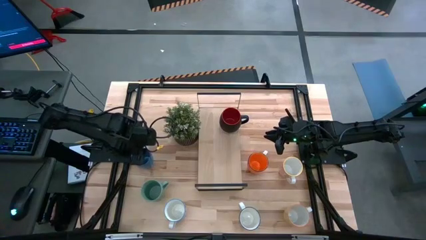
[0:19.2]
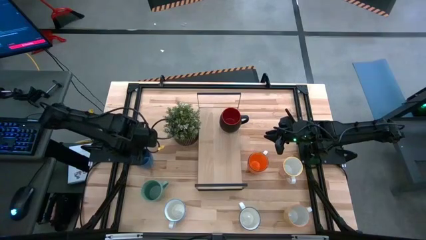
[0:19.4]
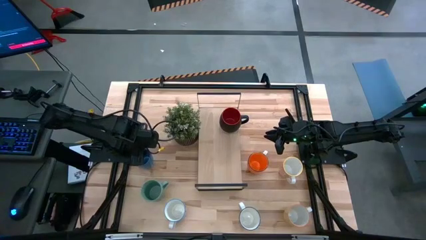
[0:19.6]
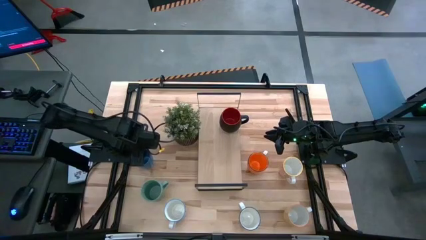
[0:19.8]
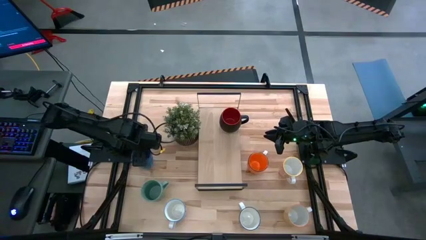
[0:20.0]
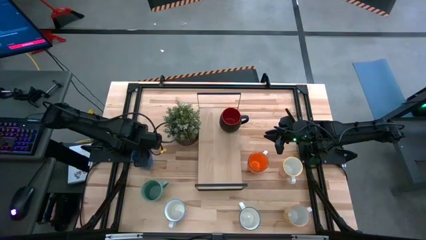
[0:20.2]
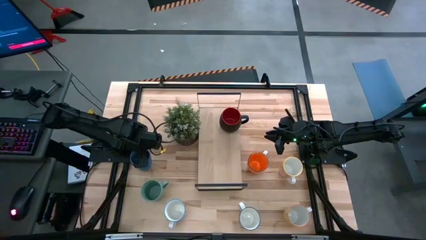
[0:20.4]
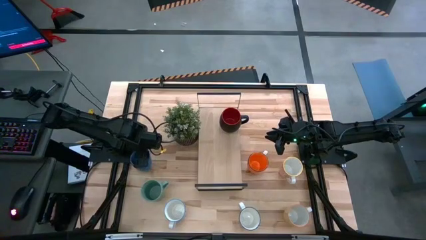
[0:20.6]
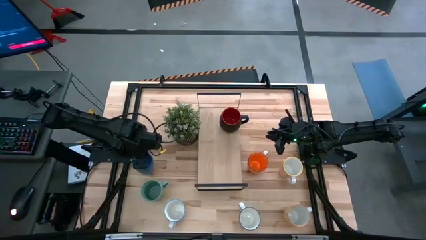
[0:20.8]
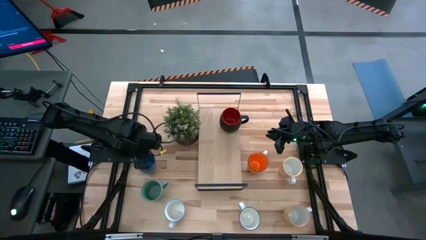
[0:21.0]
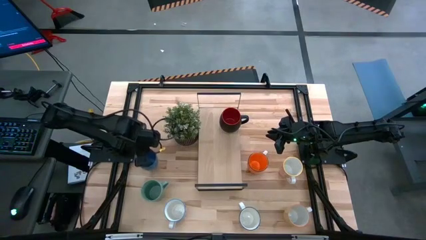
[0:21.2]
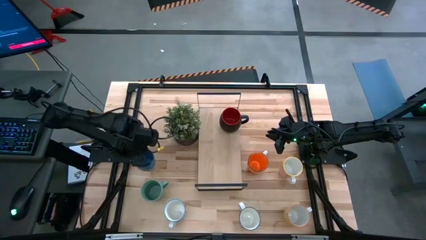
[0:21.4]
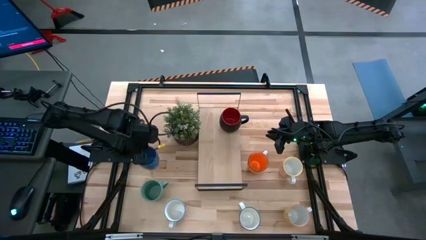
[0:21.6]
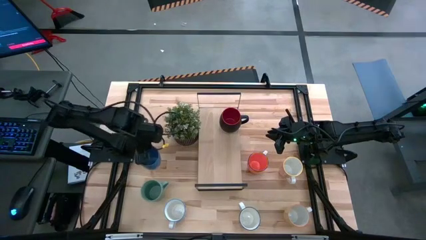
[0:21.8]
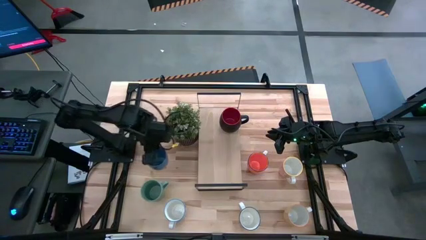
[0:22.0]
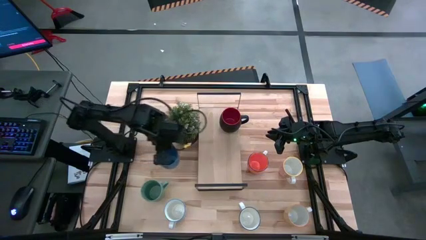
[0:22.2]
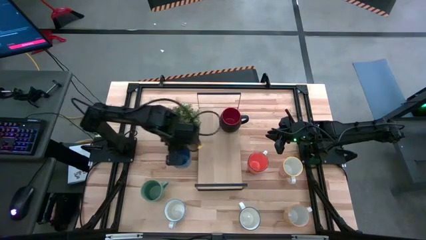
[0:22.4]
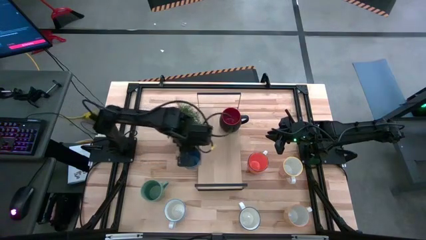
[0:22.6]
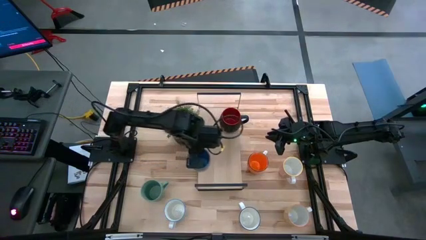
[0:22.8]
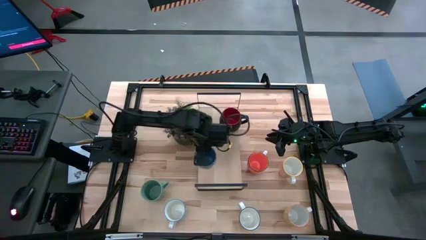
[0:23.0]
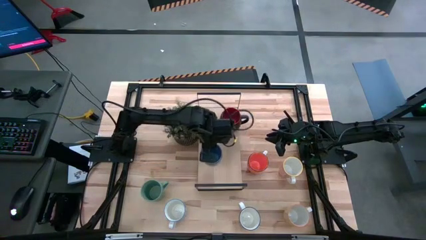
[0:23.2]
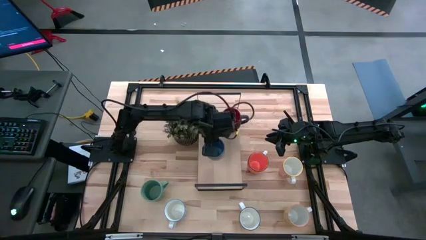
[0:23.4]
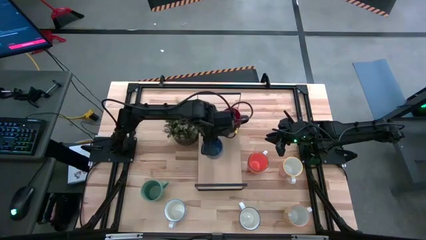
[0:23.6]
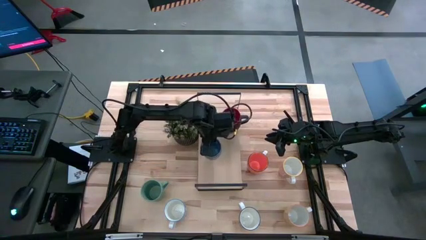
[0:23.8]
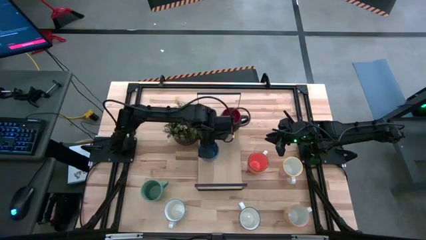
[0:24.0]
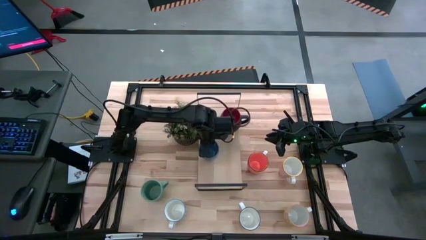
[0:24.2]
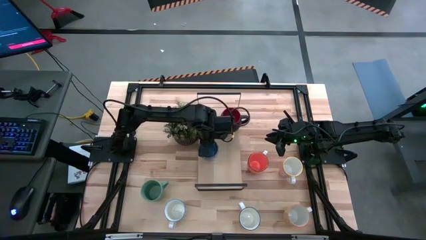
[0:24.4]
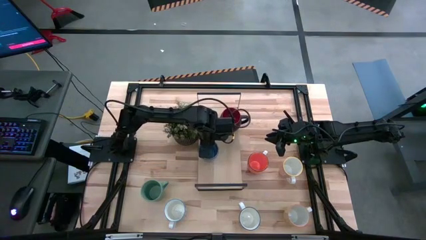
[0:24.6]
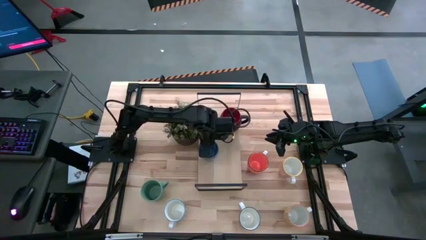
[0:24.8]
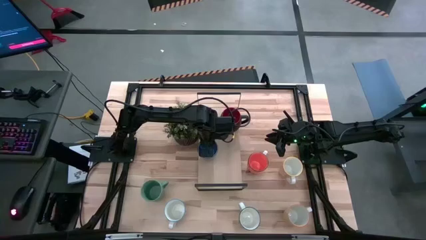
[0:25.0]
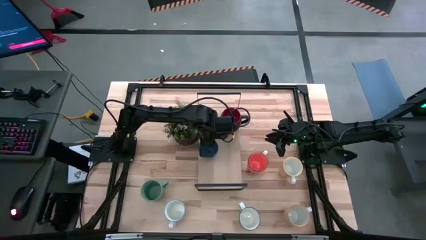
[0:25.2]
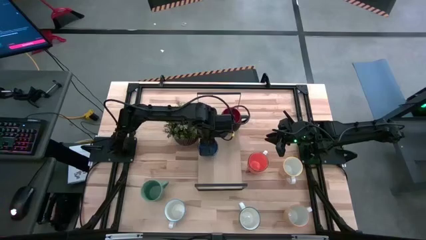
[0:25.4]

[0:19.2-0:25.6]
Task: Place coffee mugs
Put the blue mug on the shelf

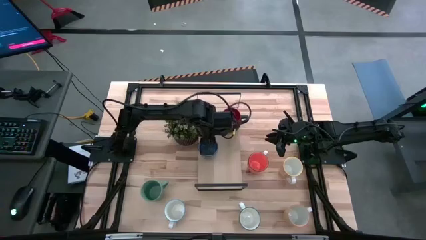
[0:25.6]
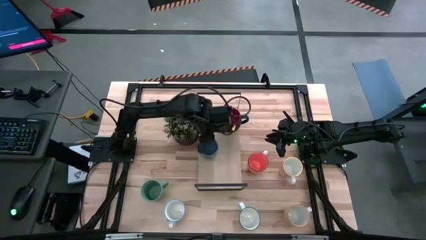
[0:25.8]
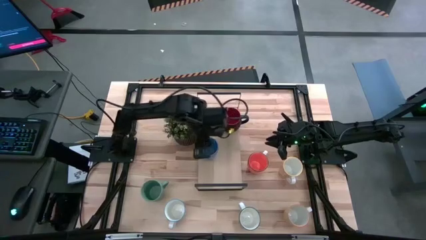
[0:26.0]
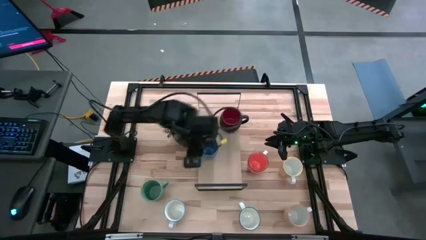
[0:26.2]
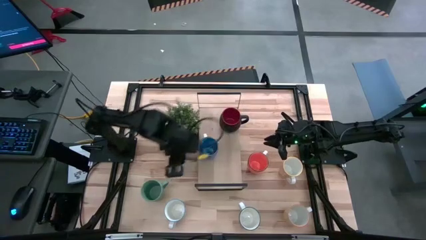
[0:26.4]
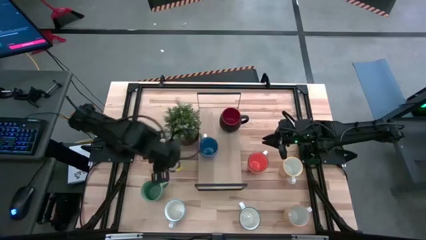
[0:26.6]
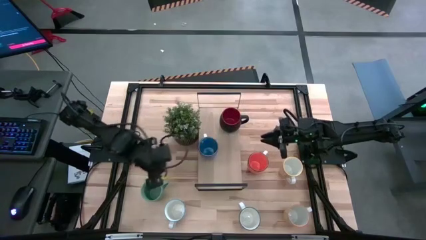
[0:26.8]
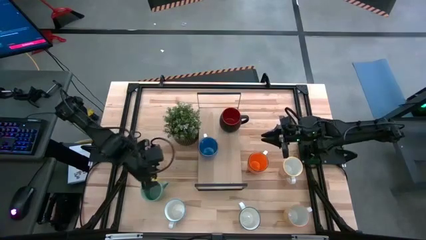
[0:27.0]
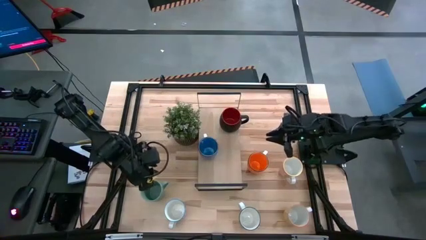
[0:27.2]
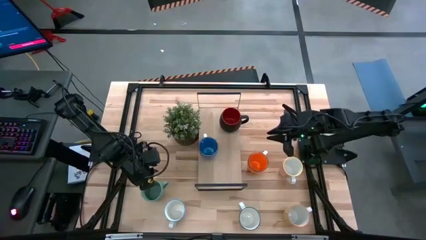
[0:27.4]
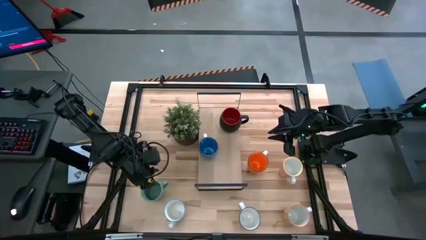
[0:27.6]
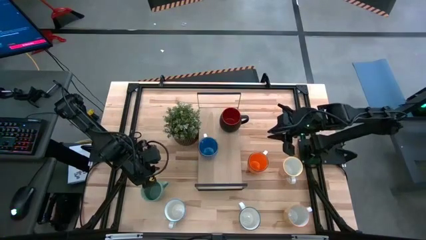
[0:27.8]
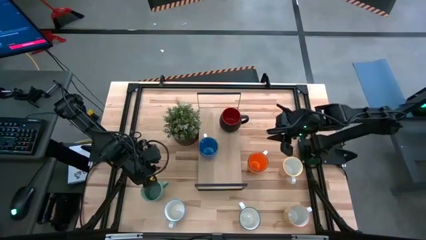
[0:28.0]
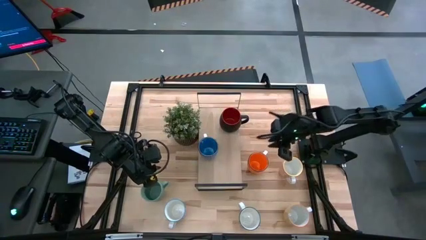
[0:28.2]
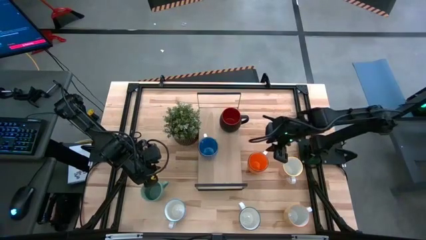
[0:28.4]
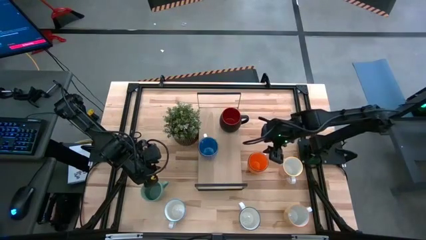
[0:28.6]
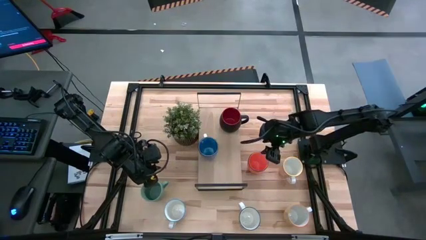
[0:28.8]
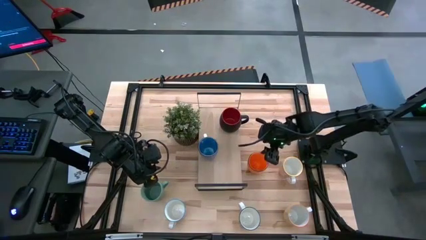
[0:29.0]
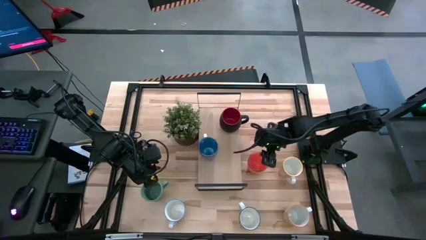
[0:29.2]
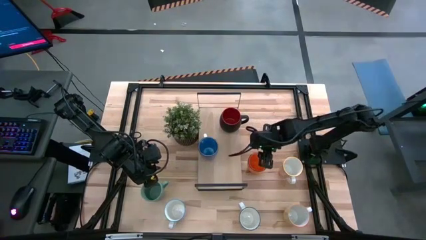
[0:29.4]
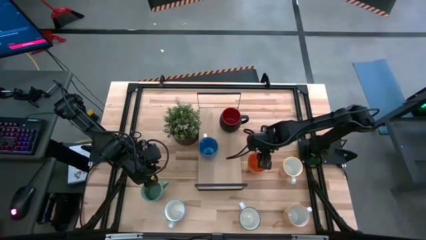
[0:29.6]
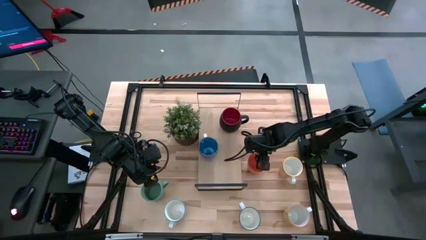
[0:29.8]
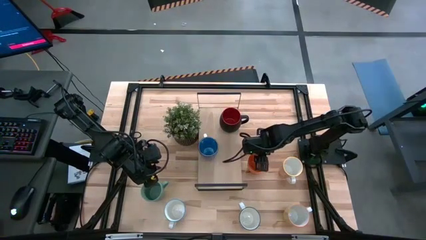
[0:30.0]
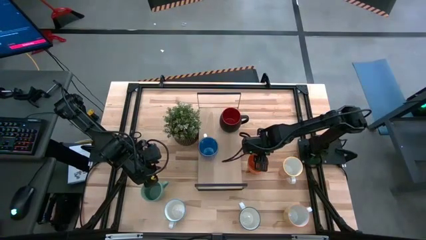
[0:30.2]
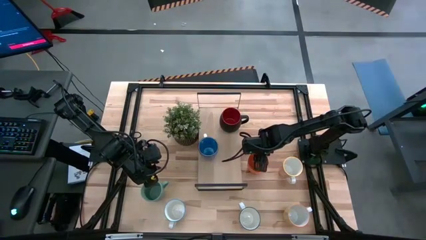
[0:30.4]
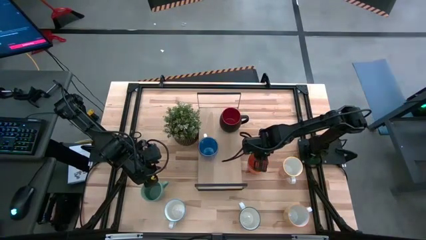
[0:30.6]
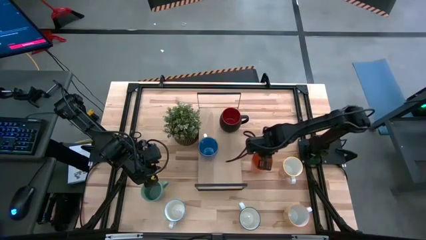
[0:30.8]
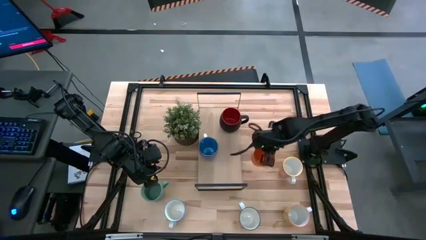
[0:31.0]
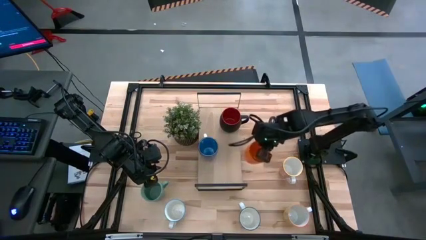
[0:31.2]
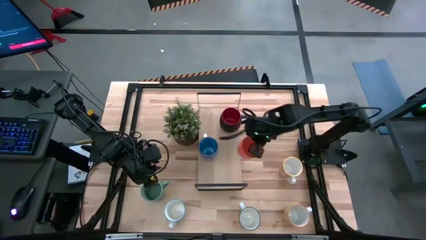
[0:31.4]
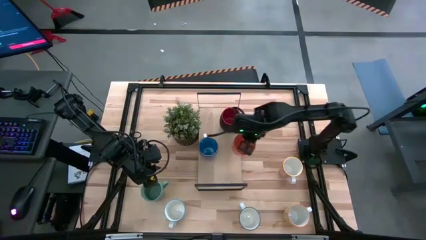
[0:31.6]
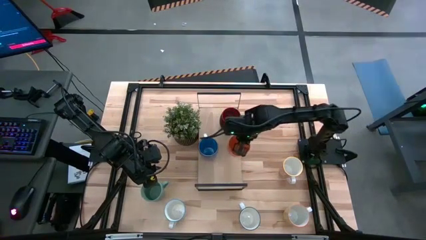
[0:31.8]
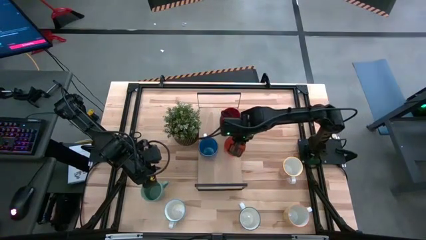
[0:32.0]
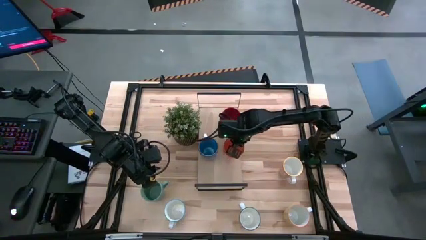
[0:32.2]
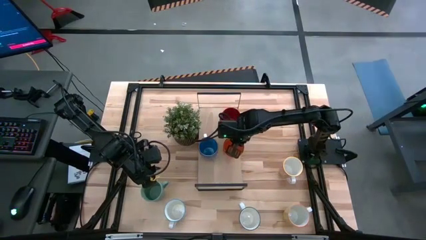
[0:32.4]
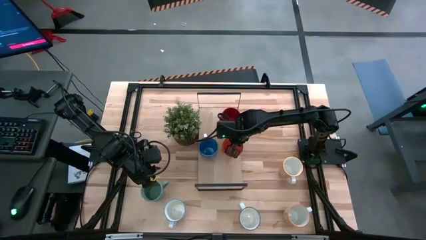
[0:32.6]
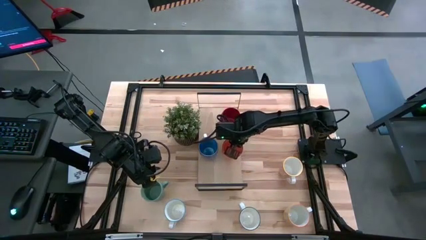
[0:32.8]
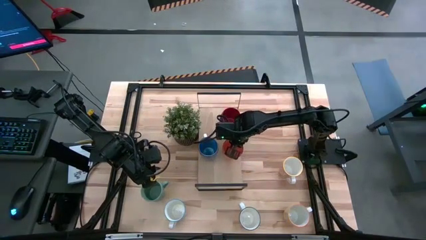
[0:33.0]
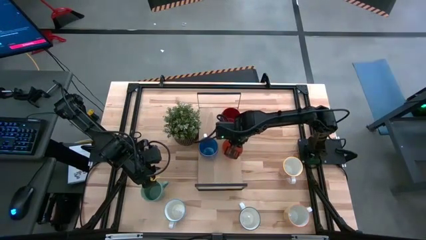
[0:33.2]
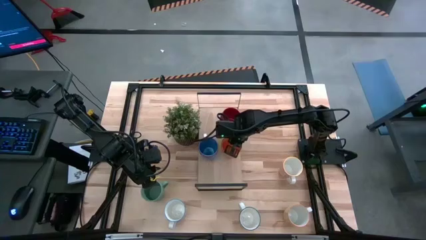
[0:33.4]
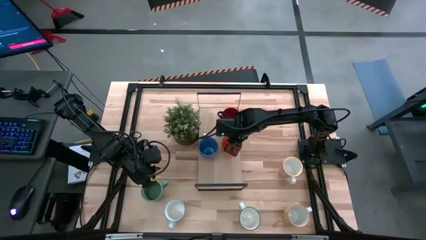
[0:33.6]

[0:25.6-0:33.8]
Put the orange mug on the shelf

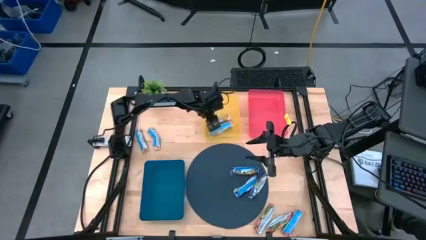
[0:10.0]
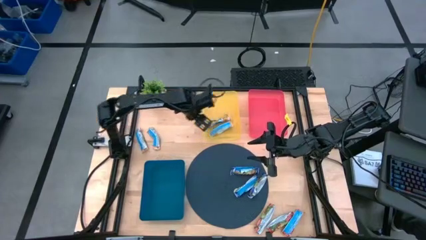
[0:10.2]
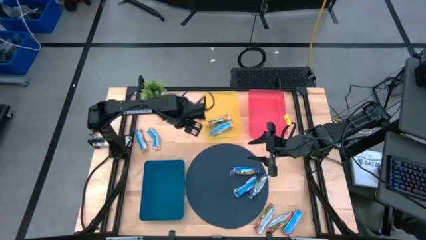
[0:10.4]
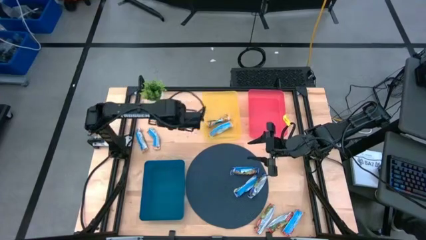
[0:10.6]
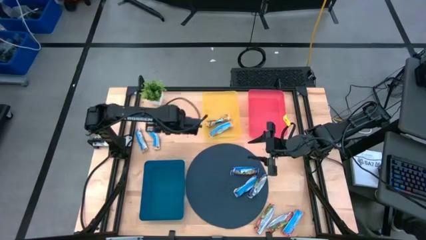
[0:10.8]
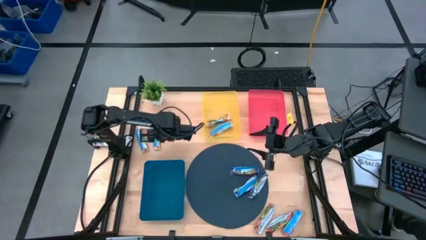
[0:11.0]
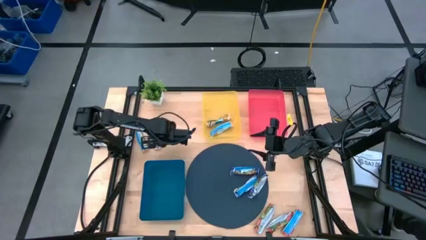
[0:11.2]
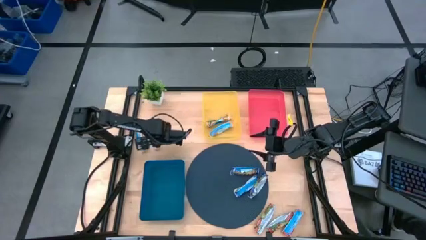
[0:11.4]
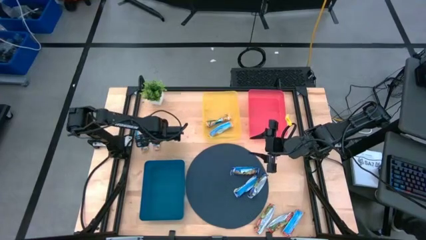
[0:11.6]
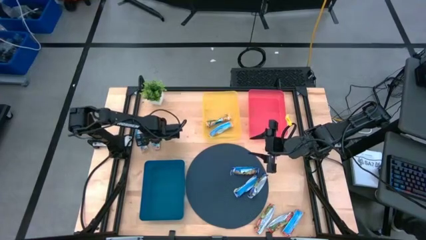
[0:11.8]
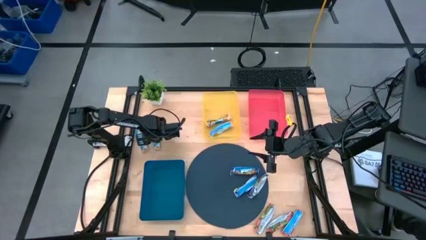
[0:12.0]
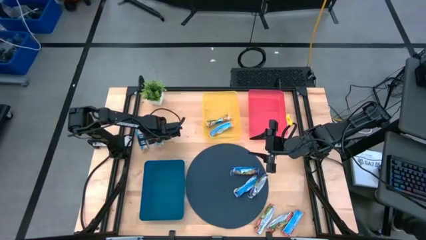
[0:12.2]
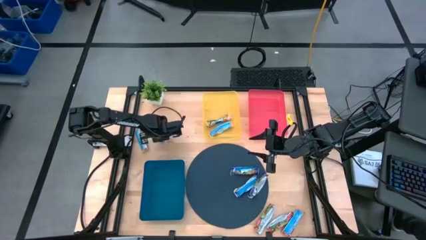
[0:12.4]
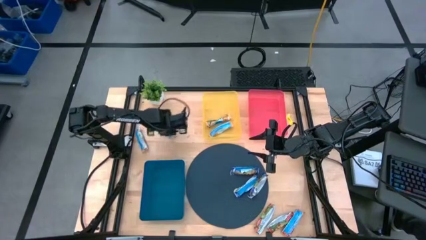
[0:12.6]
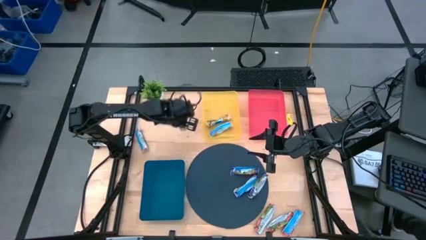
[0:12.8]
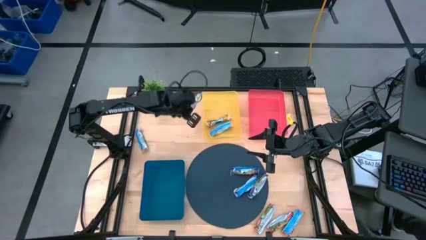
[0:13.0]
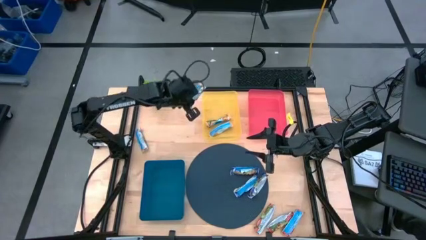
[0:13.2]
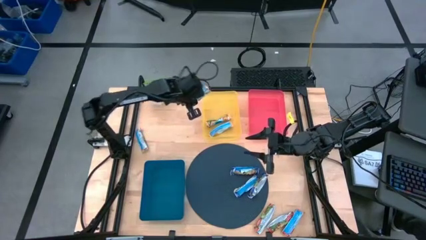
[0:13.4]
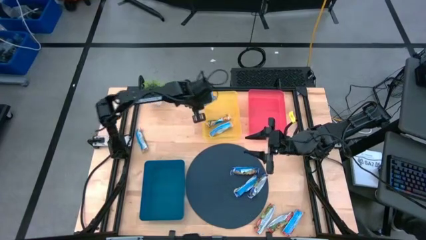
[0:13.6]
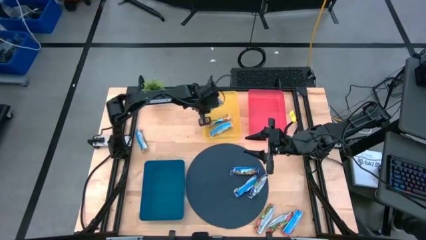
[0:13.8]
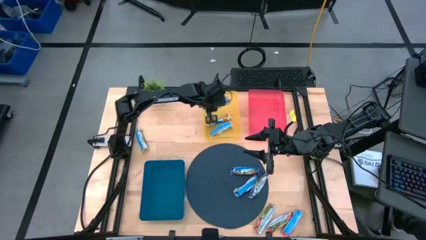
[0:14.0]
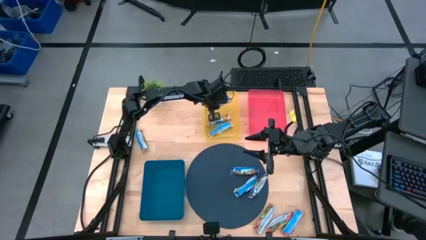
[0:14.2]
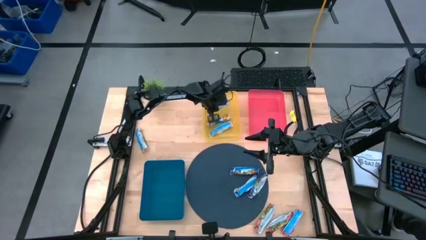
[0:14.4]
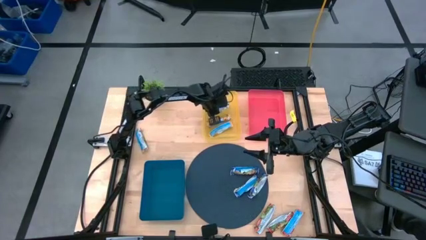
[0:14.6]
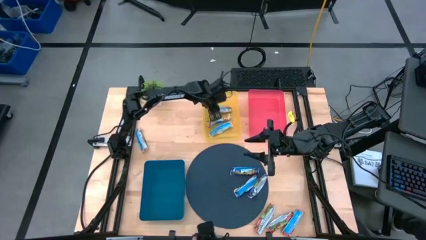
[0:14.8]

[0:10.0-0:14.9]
Task: Pick and place Granola Bars by type
Put the yellow granola bar into the yellow bin
